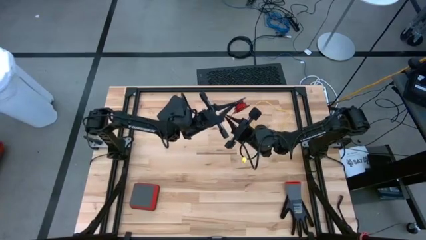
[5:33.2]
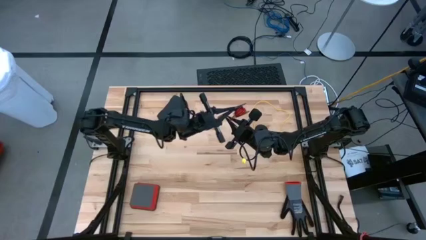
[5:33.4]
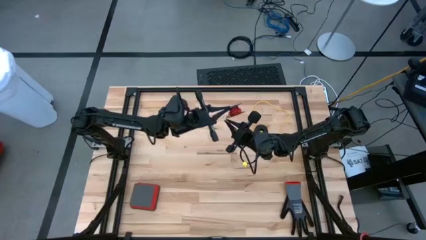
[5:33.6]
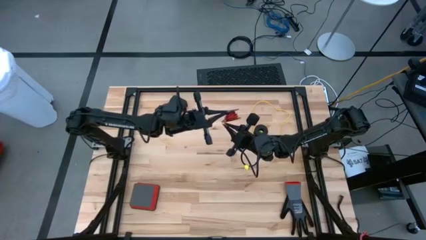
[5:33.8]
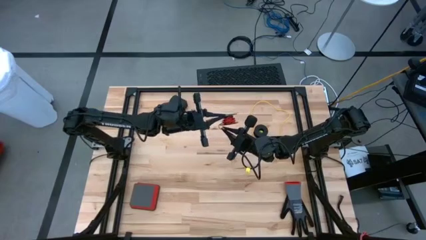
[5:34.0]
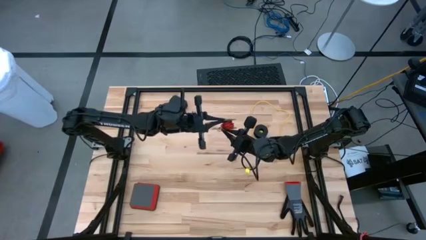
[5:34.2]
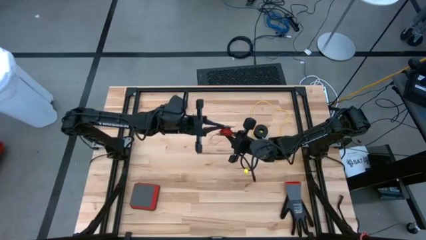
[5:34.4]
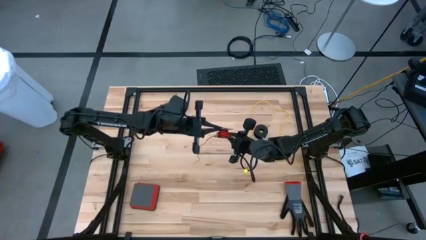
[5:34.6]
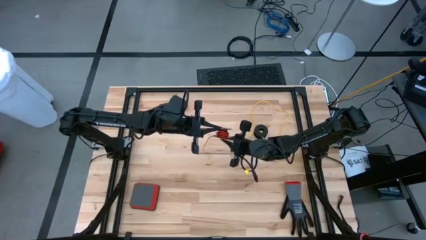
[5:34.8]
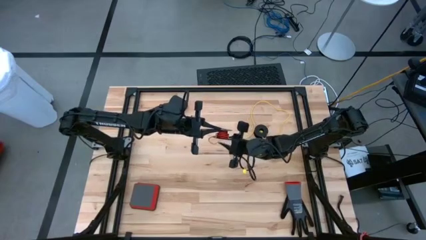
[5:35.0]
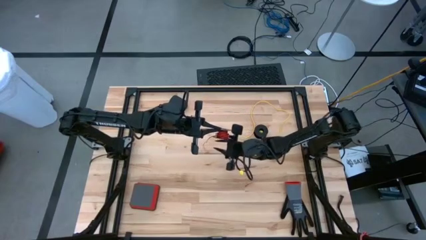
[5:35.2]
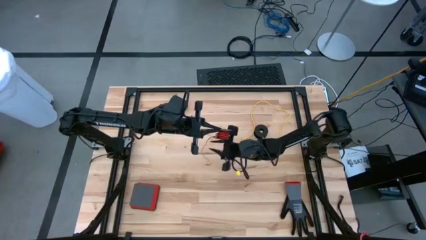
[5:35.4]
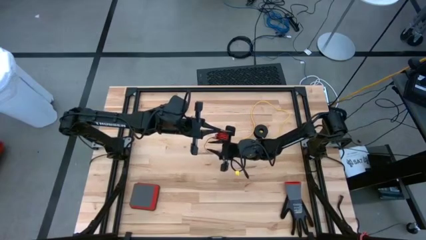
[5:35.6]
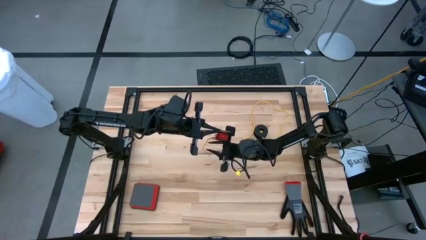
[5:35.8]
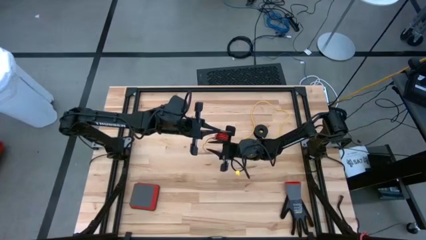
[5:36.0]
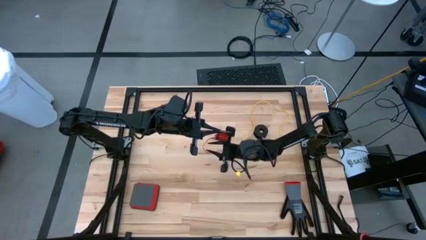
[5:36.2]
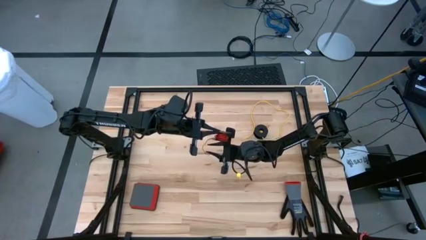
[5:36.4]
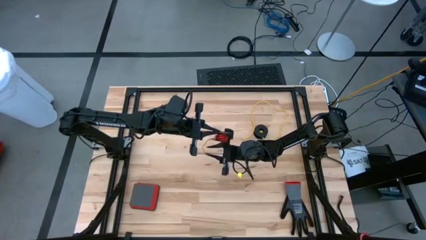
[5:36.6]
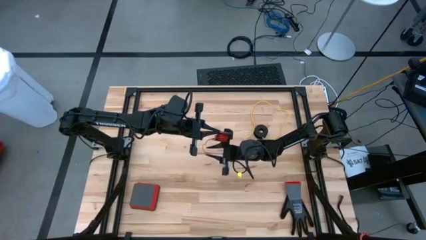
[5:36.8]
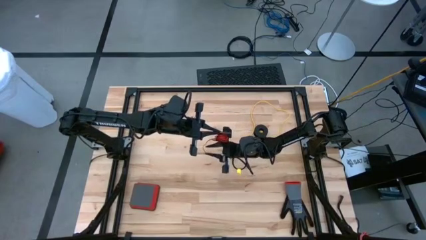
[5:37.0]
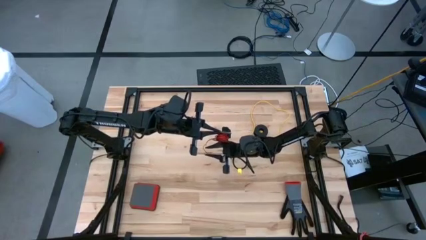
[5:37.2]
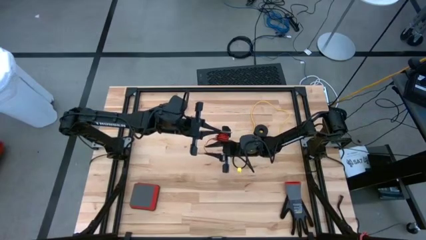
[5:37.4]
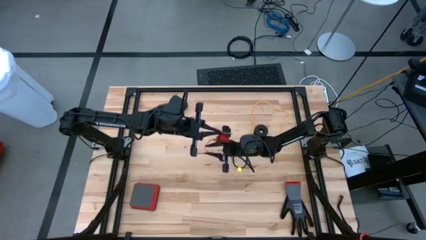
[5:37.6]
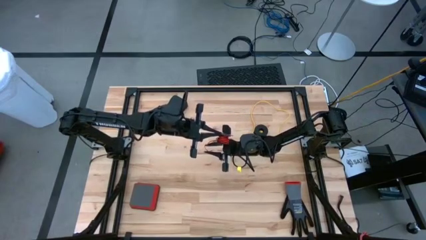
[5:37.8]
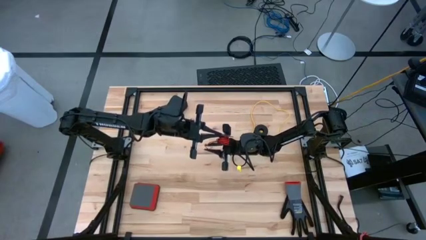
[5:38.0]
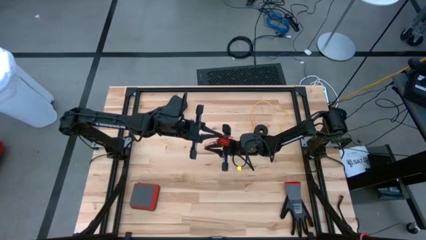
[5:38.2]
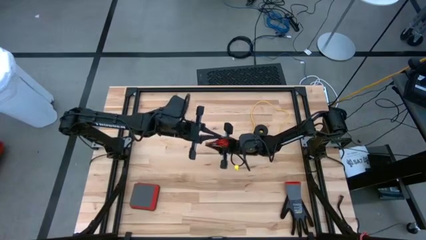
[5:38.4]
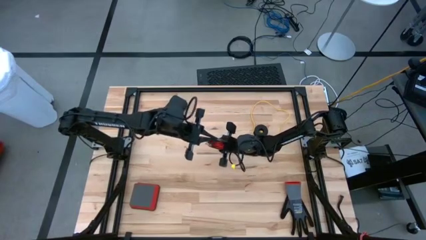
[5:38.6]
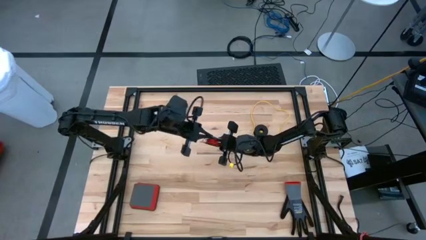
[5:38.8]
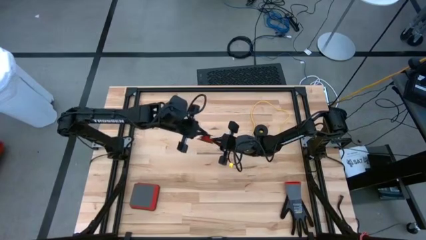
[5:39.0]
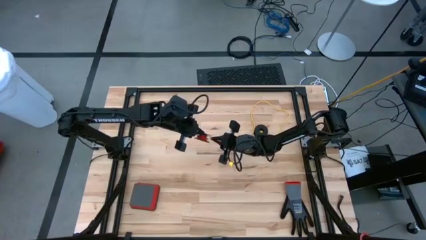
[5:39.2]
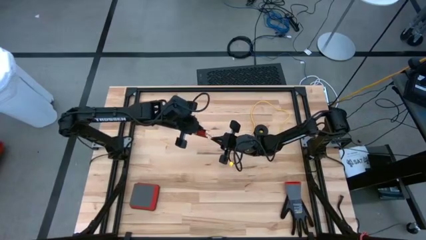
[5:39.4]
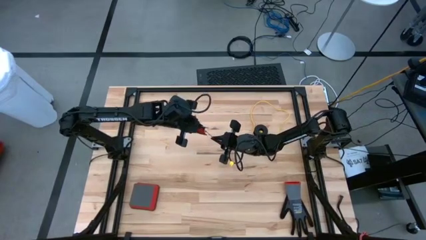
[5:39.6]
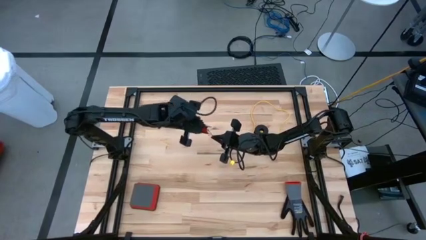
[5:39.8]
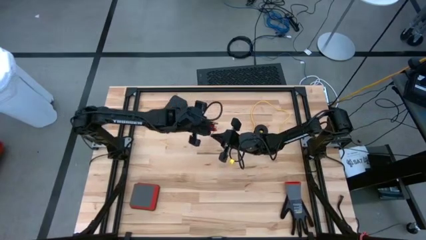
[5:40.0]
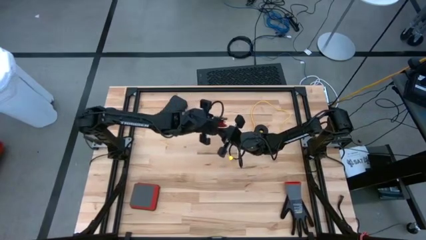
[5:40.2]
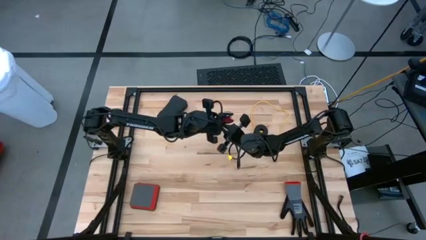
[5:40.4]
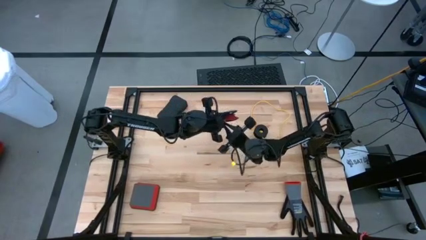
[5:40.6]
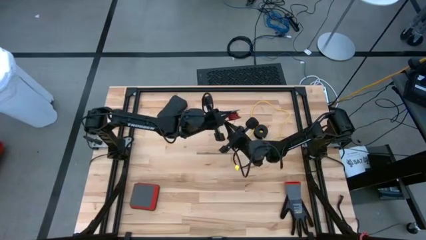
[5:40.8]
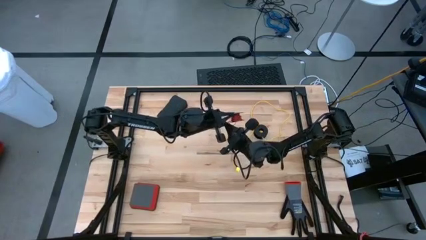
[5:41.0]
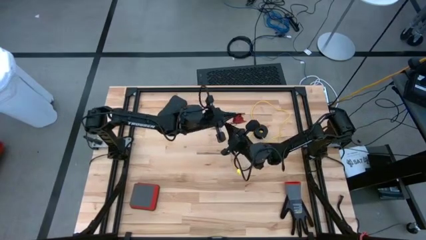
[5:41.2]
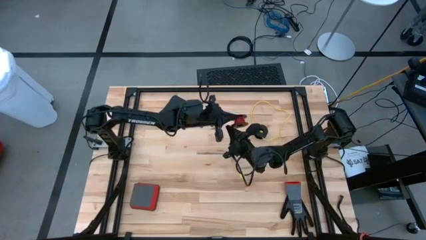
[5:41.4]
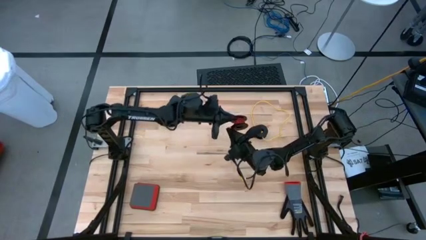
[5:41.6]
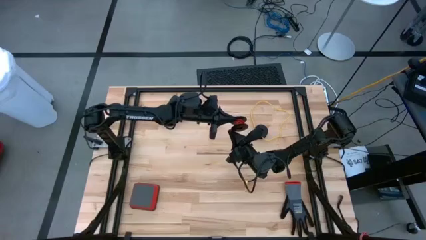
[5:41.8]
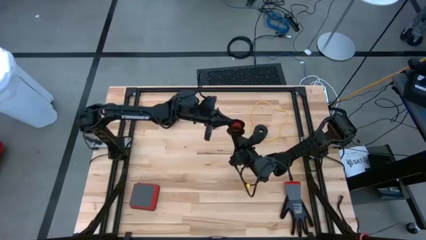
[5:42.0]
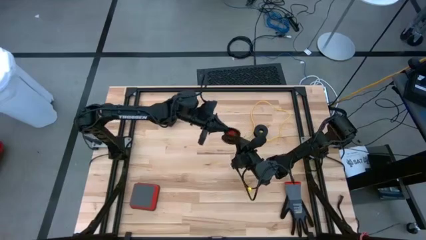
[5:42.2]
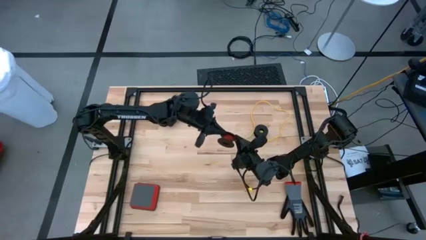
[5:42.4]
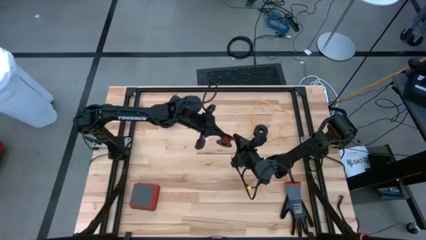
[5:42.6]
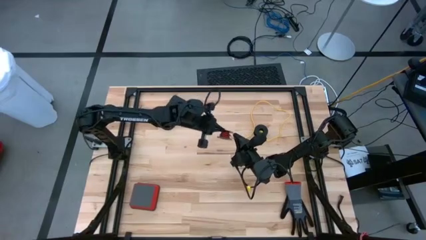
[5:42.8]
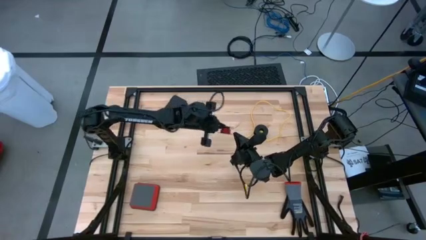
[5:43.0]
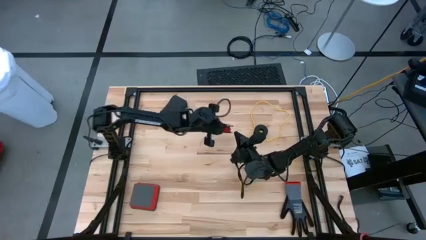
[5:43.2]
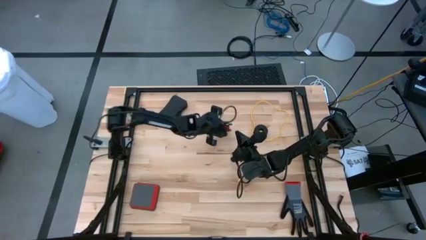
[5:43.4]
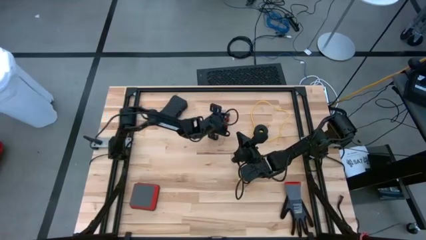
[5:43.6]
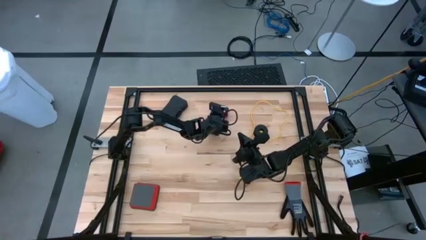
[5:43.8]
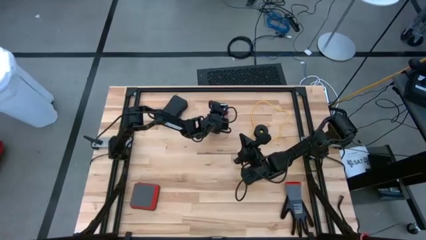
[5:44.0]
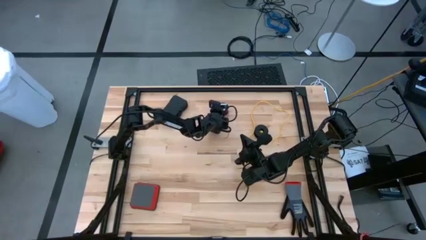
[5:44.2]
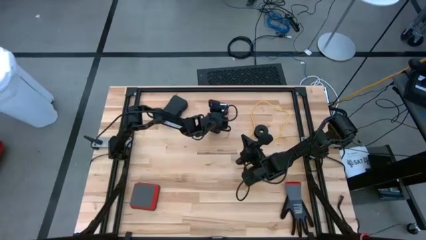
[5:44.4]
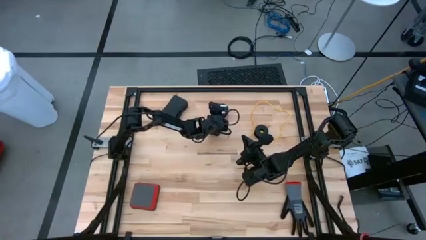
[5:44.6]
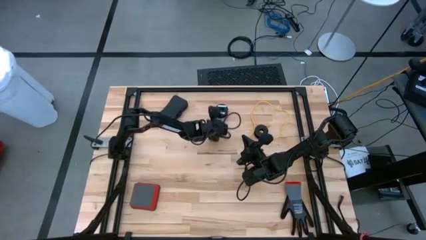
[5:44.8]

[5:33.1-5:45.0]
Task: Coil cords
Coil the red wire onto the black spool
